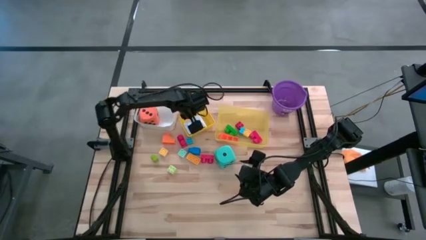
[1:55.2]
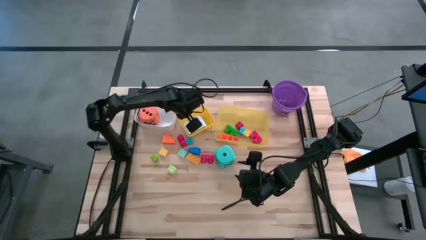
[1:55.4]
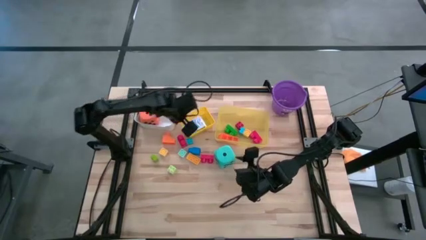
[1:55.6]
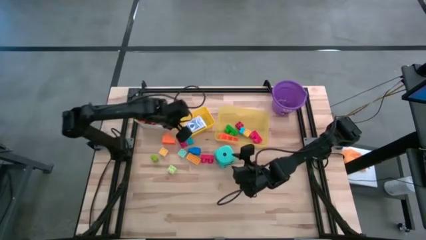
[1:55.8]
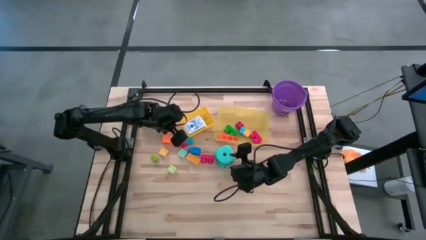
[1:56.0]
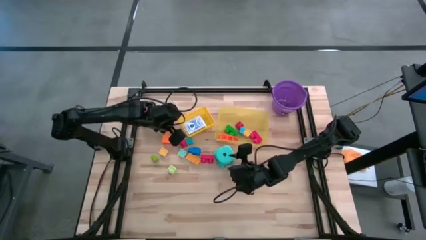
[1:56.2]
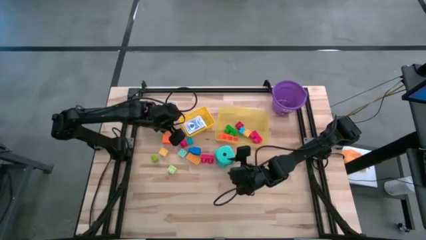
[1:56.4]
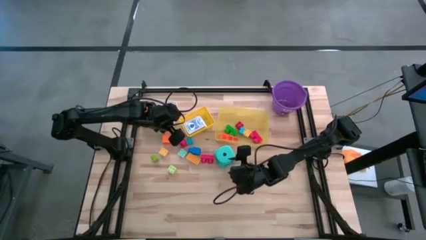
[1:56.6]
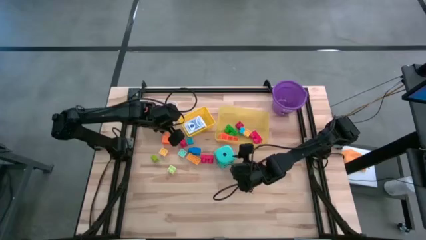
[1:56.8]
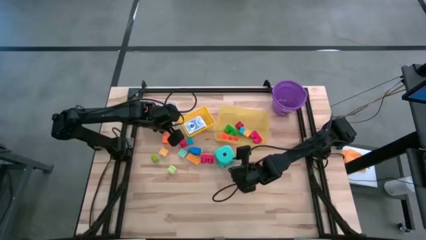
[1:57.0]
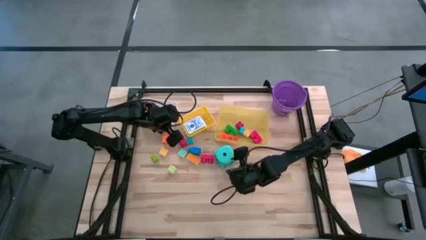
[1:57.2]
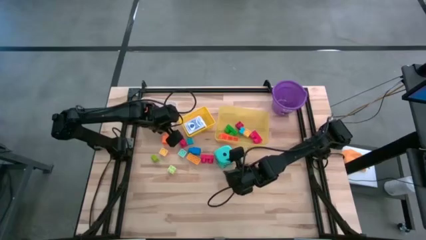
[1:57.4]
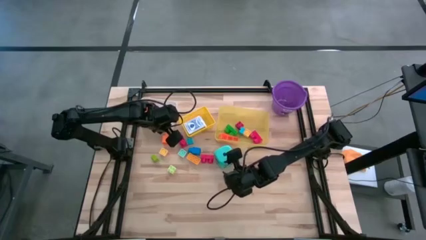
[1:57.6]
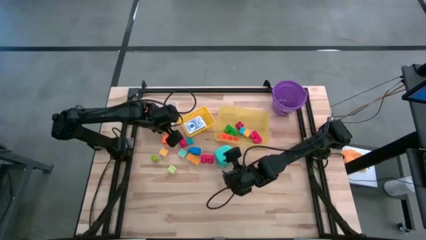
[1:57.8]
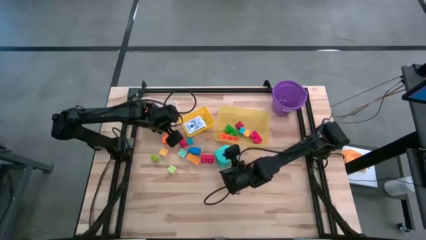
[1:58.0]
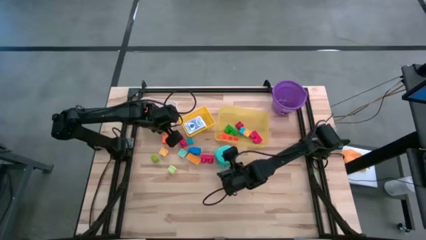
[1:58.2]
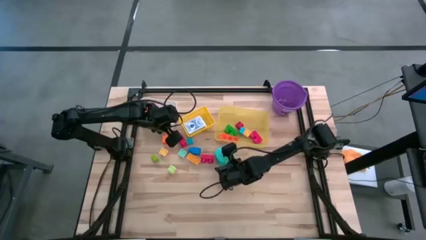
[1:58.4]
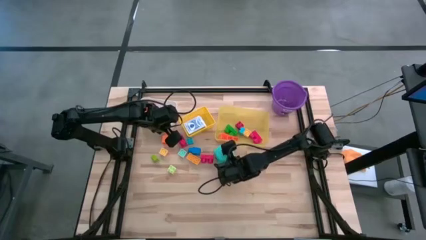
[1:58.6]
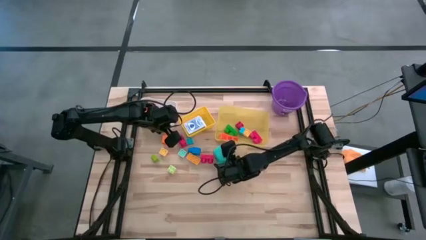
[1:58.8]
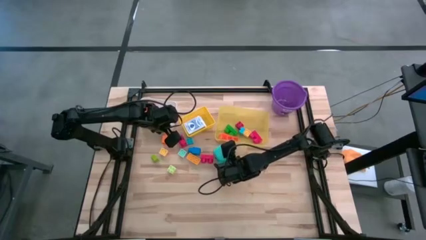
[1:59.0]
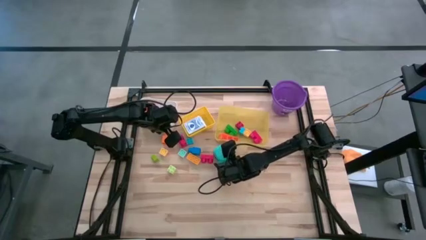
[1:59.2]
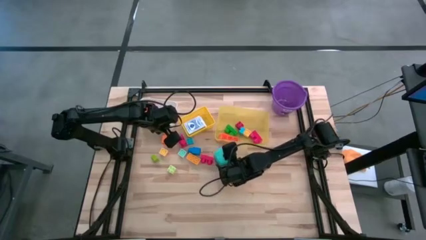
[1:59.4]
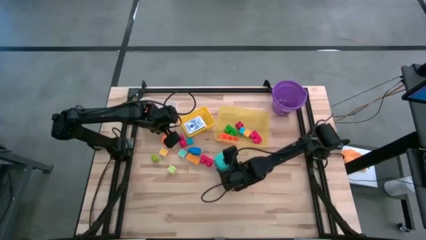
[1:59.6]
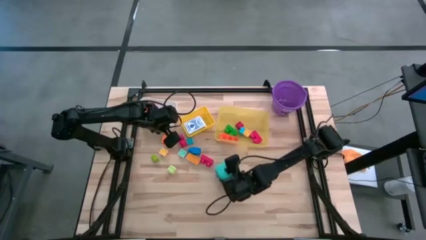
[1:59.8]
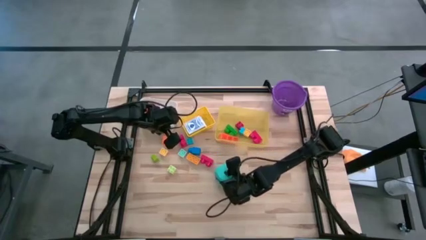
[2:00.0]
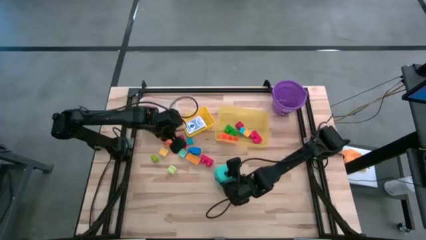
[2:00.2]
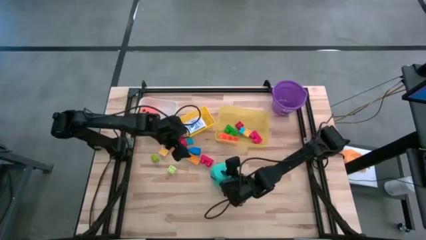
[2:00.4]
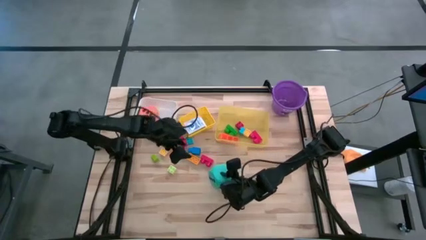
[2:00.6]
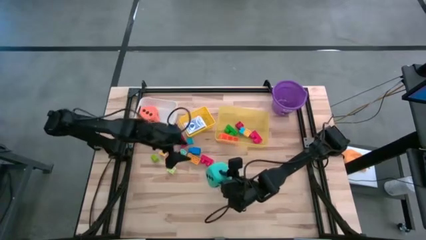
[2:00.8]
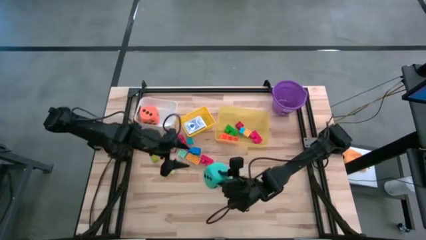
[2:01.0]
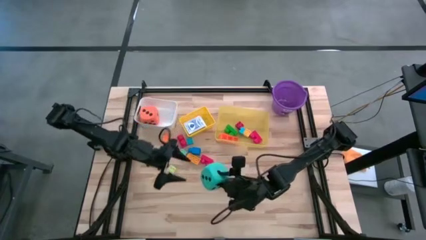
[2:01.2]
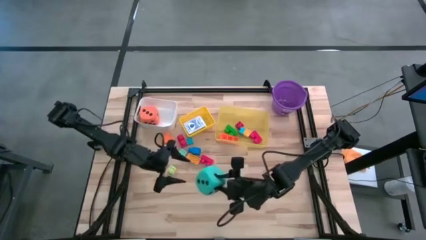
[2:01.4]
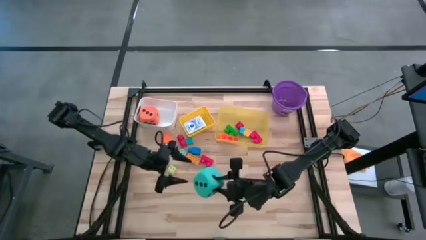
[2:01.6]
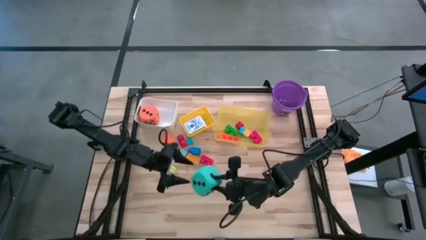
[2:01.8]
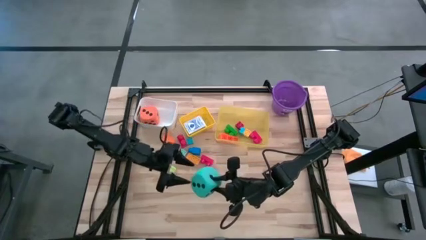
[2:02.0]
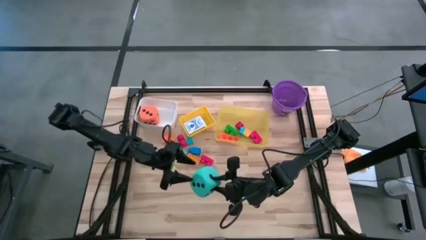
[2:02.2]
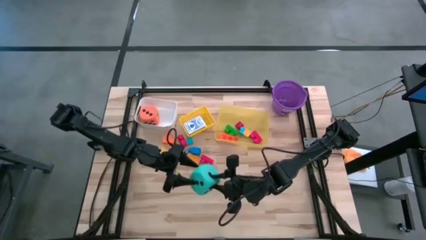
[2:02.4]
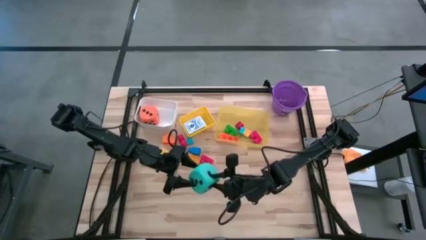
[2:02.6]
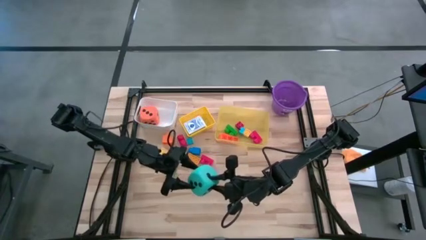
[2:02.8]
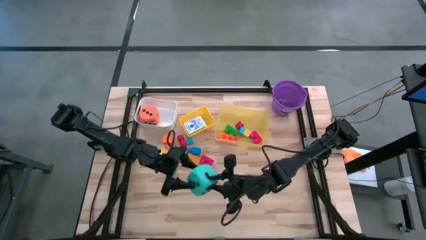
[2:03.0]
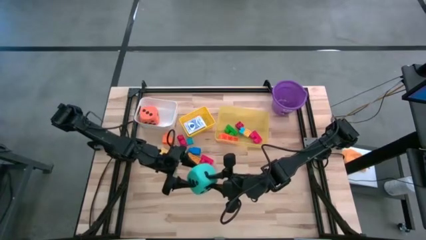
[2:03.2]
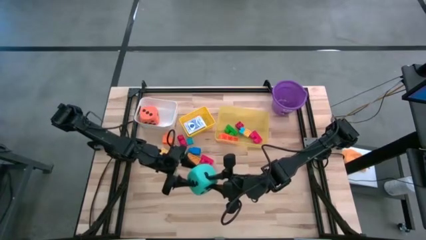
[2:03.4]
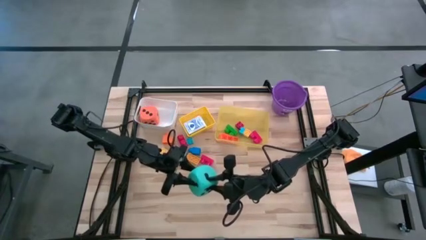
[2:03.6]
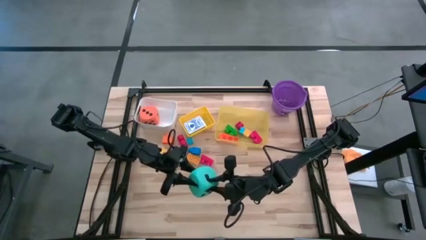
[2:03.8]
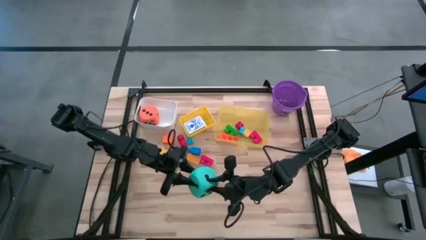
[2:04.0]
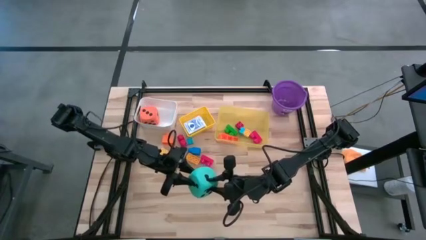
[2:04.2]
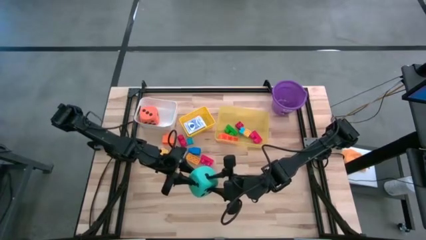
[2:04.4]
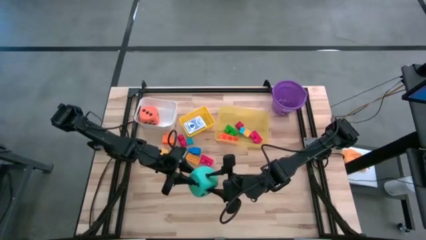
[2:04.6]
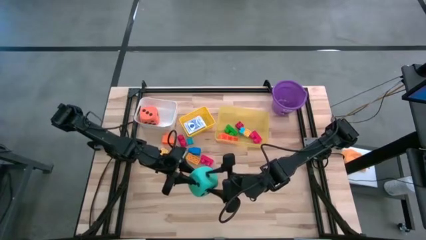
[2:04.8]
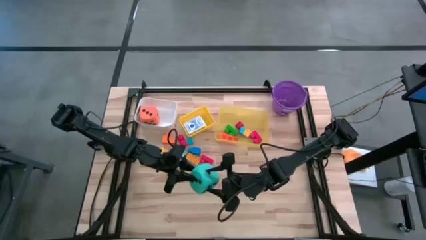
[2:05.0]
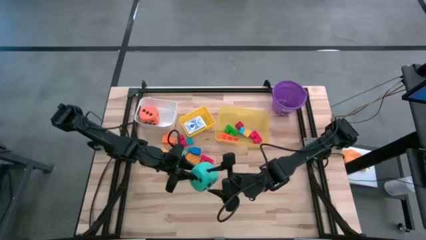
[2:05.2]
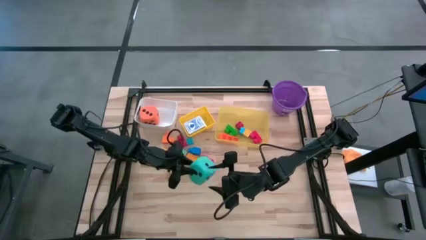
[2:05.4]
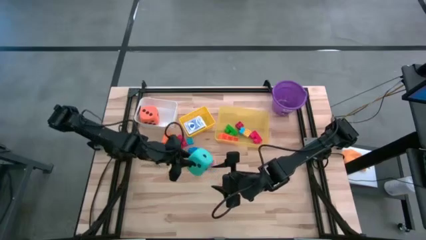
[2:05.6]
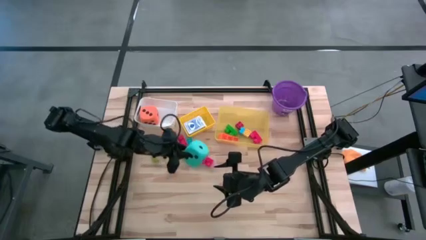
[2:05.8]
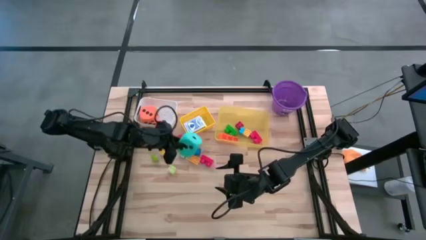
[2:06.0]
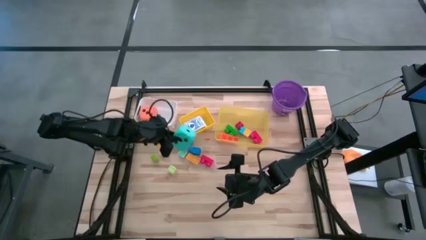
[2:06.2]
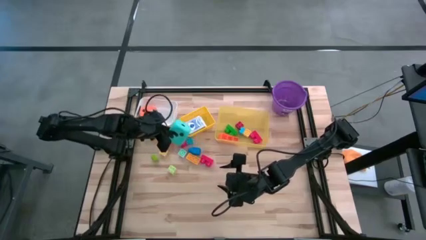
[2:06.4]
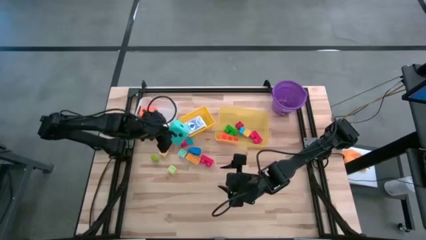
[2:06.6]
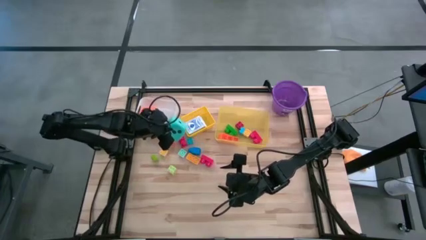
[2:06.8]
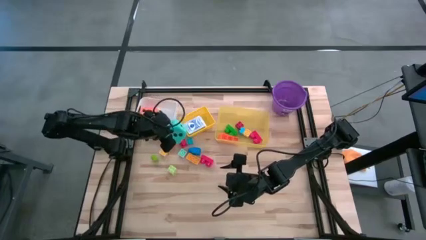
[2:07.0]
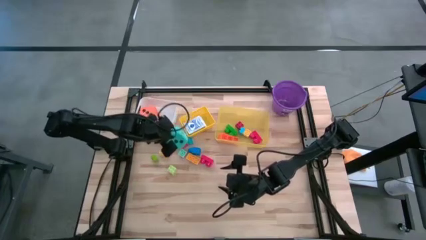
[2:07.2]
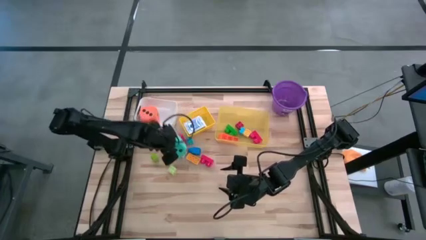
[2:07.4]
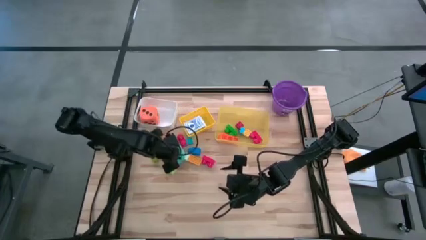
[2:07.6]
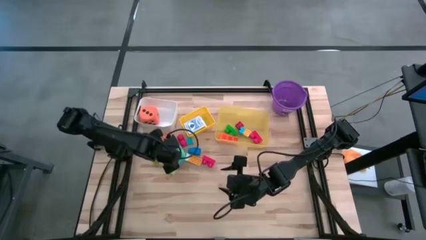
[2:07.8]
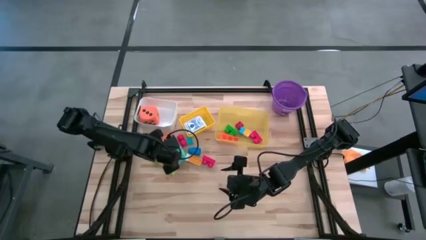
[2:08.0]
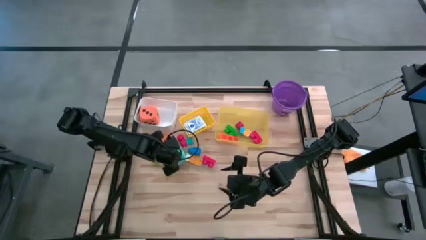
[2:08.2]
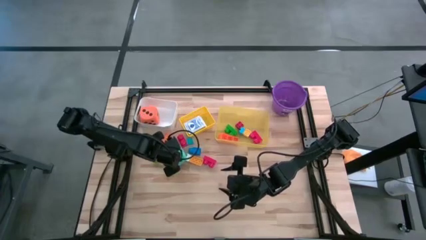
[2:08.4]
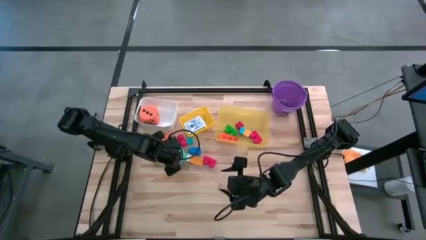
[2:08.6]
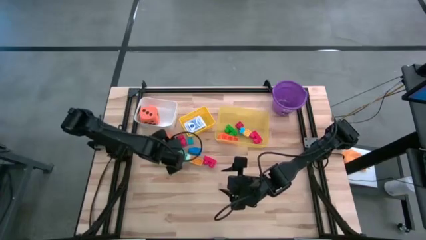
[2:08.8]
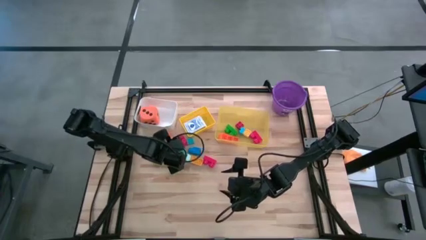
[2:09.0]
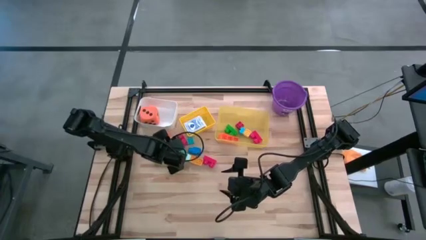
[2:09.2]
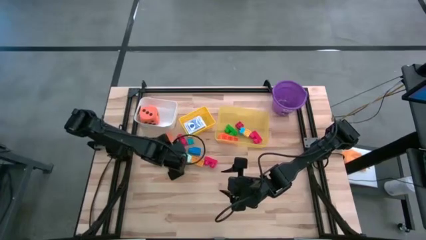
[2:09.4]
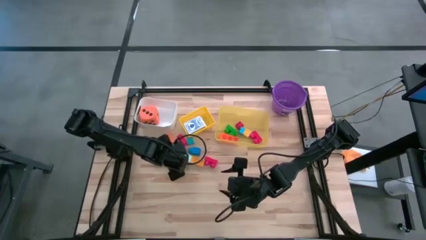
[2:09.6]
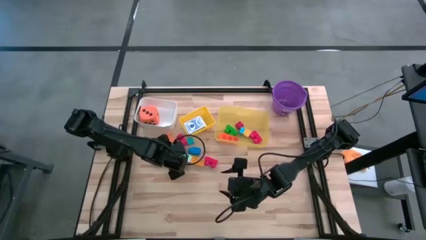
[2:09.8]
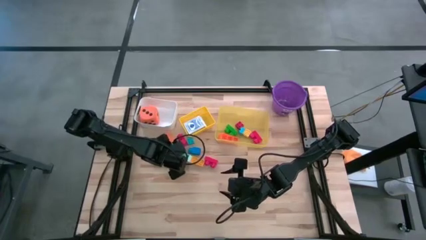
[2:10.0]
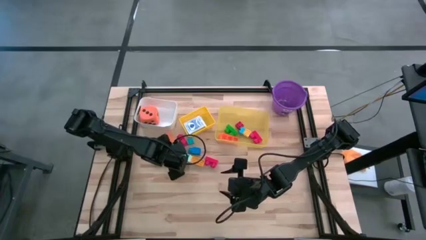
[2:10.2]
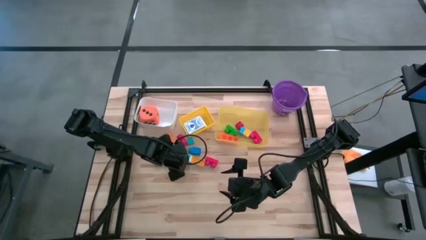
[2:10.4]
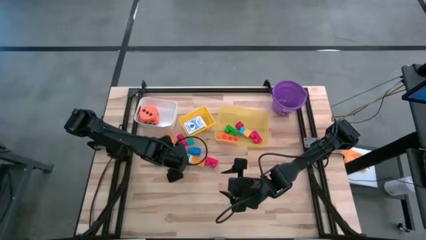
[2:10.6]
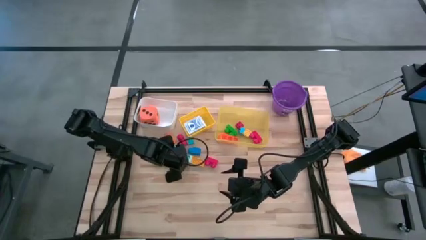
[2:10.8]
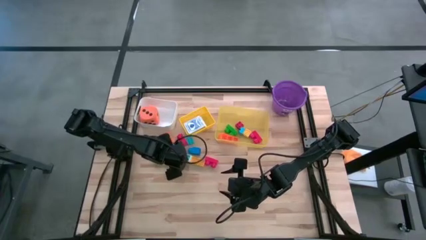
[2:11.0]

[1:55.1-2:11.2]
Task: Pick & Place Toys
Put the blue dice into the white bin

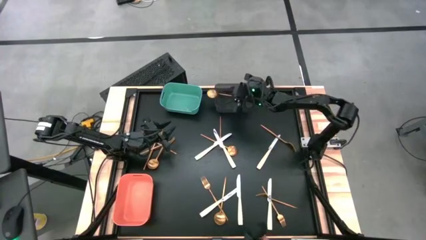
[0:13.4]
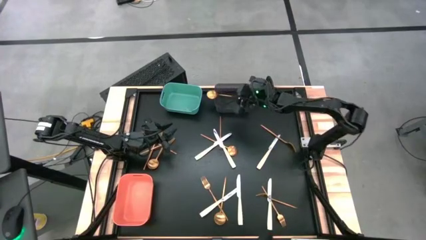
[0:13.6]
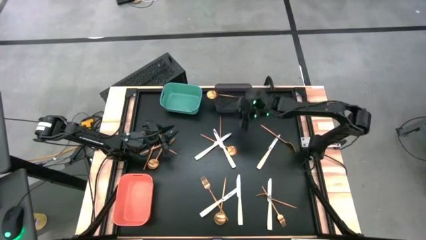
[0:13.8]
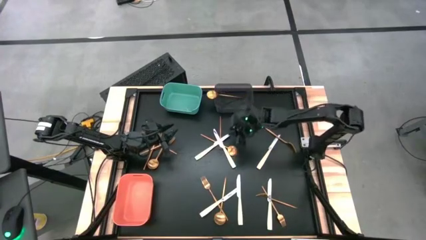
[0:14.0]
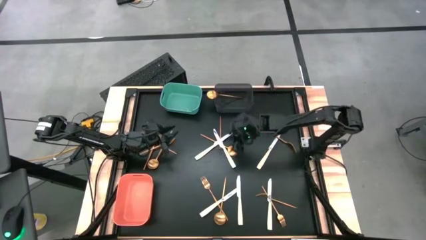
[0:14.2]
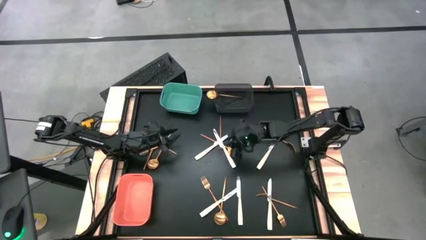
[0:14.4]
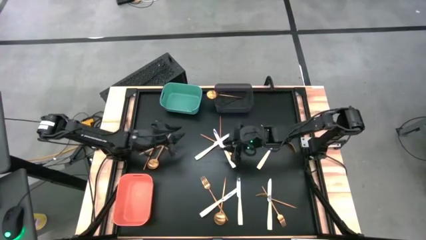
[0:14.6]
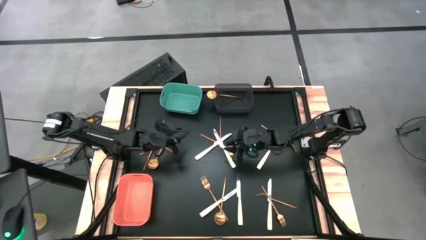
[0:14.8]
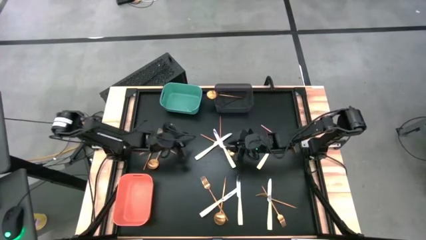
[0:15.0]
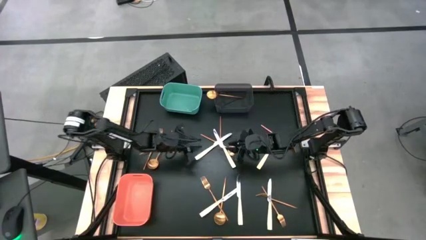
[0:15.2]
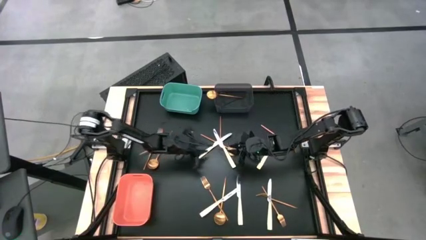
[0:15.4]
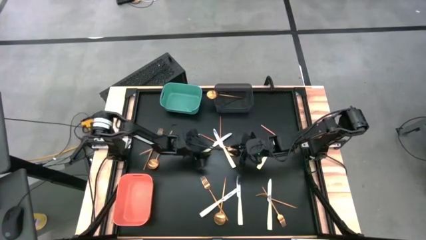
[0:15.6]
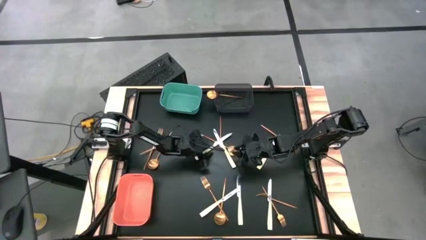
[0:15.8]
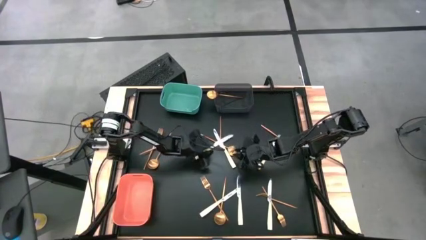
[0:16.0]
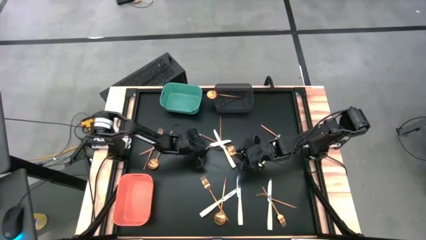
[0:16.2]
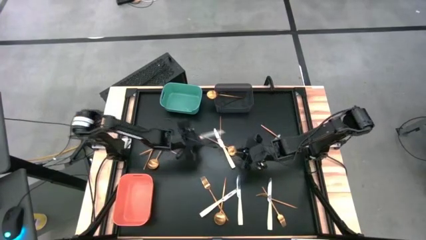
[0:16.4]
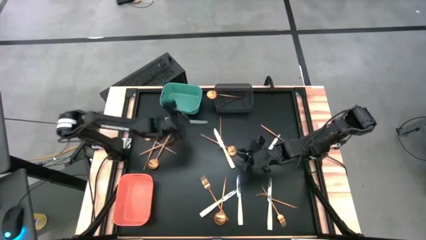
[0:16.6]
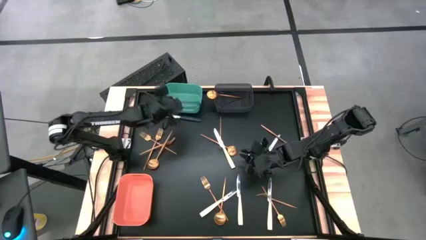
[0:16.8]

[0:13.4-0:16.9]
Task: Sort silverware by color (type)
Put the silver knife into the light blue bin
